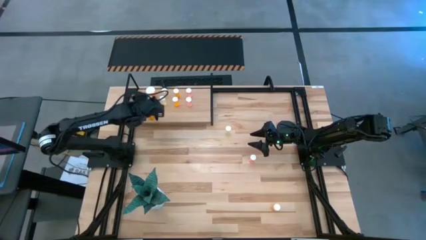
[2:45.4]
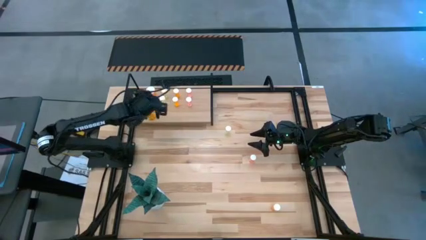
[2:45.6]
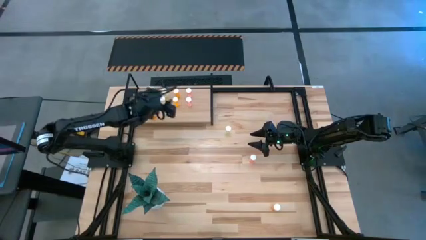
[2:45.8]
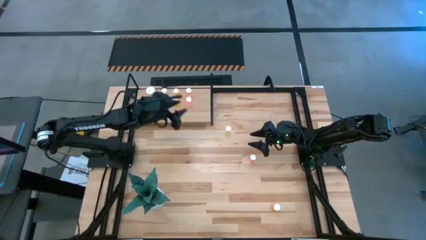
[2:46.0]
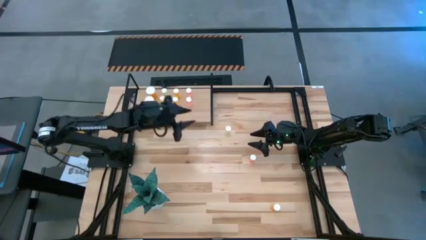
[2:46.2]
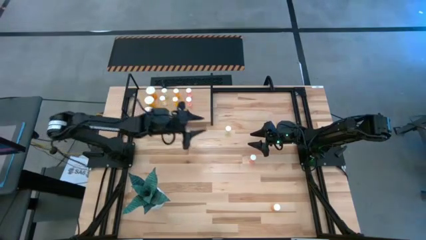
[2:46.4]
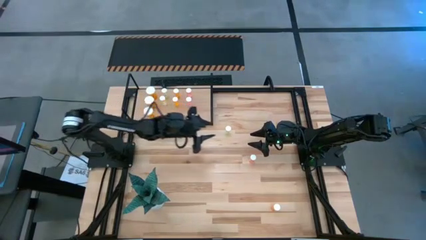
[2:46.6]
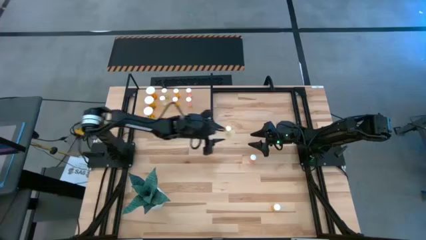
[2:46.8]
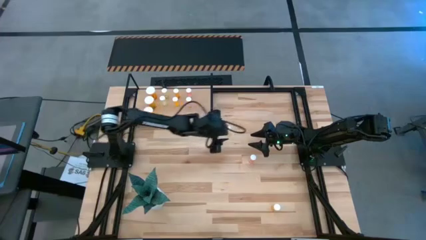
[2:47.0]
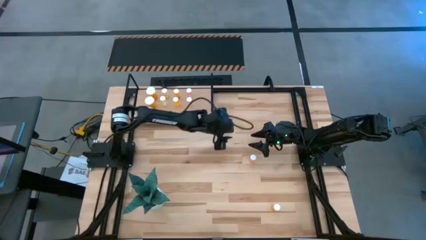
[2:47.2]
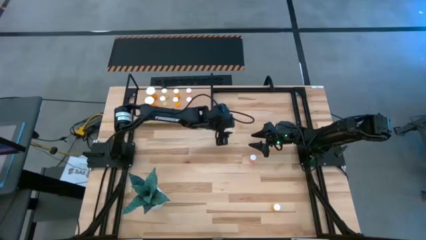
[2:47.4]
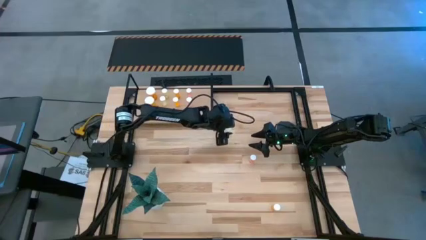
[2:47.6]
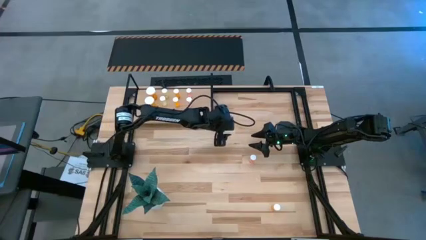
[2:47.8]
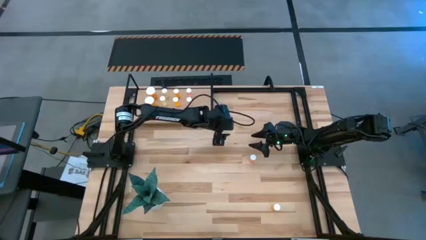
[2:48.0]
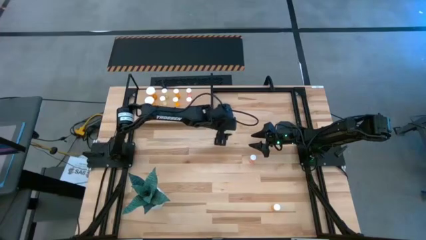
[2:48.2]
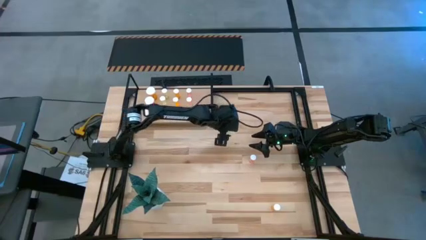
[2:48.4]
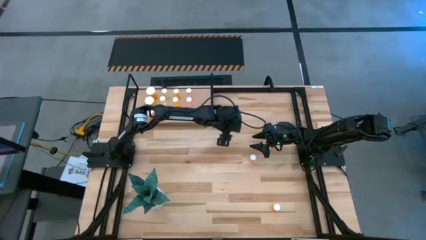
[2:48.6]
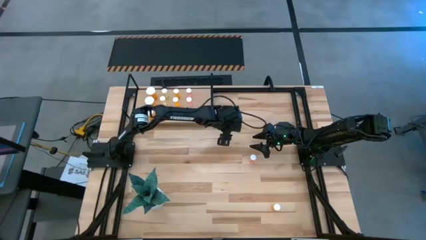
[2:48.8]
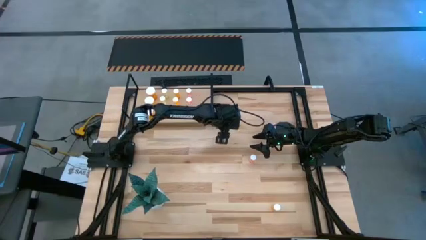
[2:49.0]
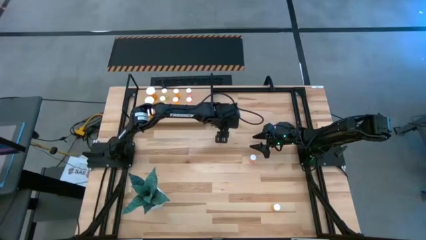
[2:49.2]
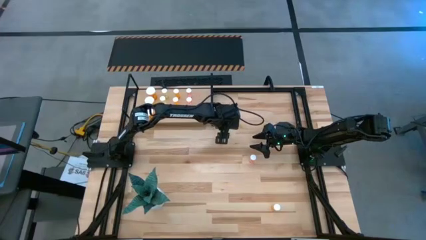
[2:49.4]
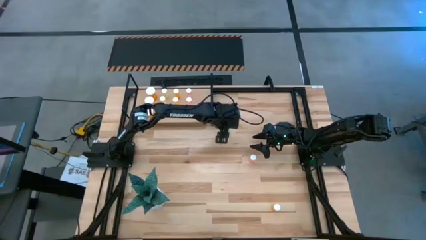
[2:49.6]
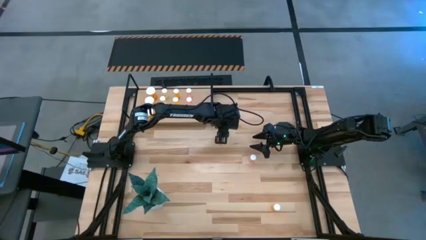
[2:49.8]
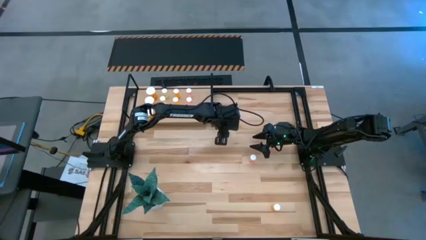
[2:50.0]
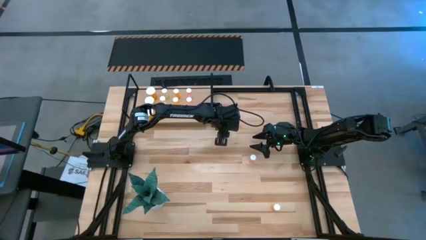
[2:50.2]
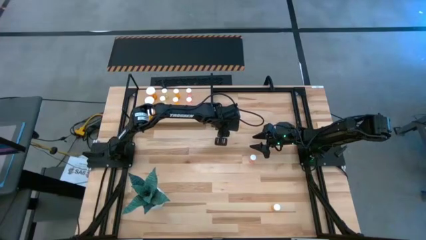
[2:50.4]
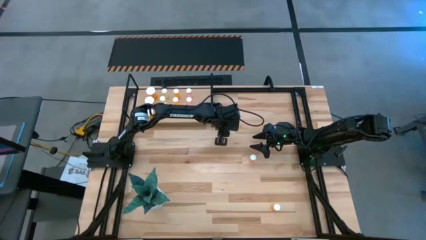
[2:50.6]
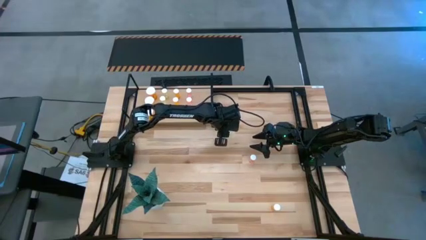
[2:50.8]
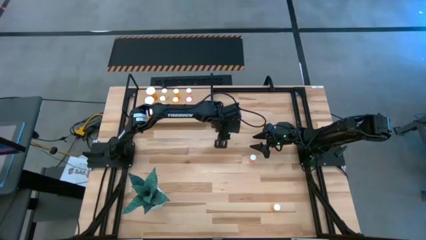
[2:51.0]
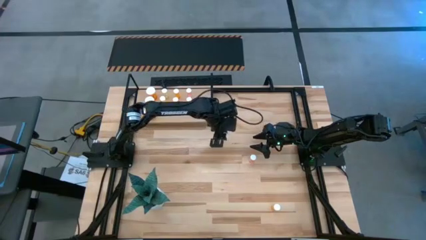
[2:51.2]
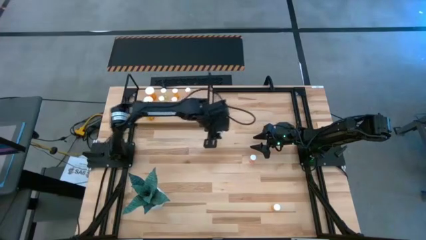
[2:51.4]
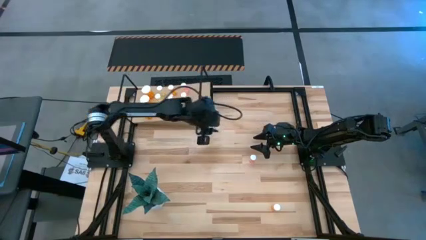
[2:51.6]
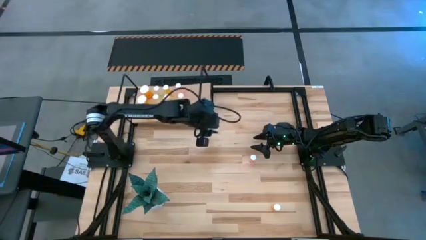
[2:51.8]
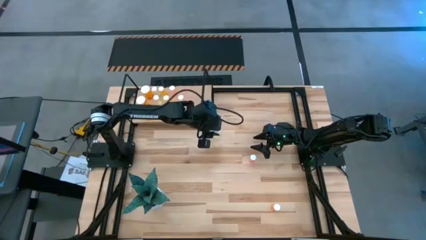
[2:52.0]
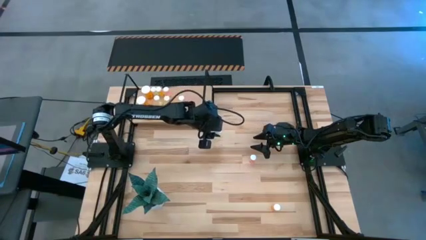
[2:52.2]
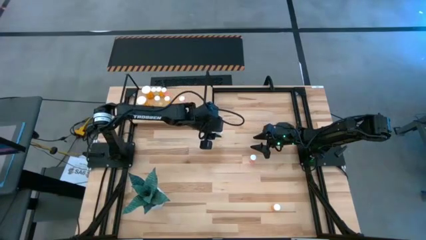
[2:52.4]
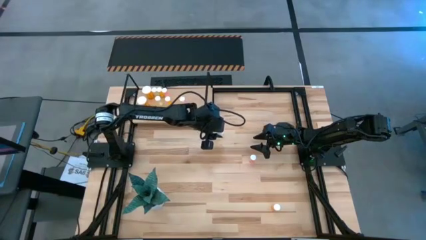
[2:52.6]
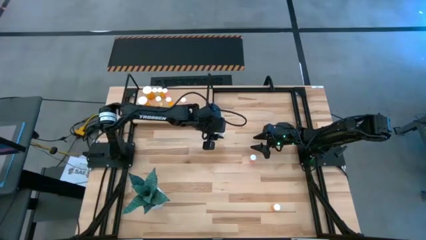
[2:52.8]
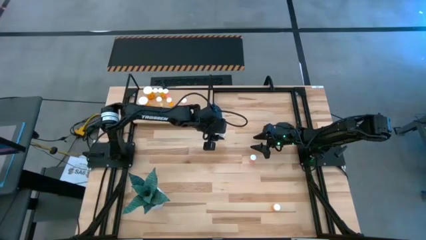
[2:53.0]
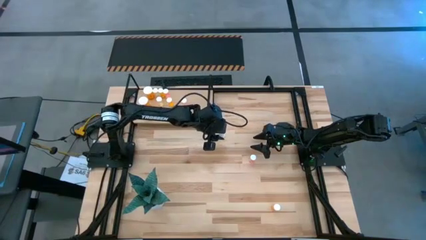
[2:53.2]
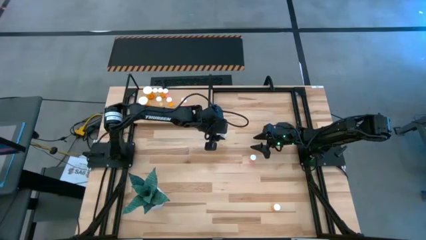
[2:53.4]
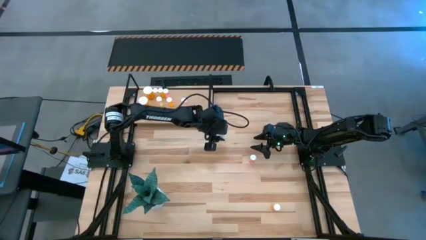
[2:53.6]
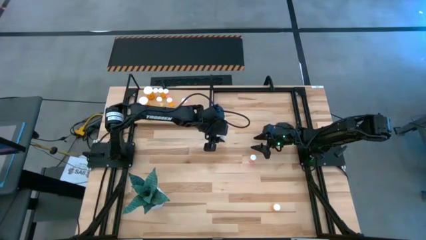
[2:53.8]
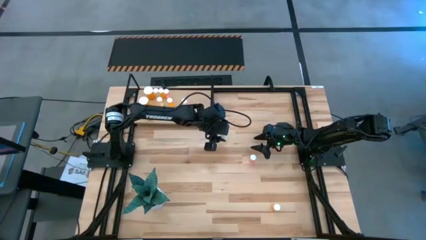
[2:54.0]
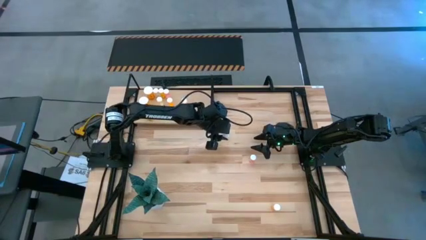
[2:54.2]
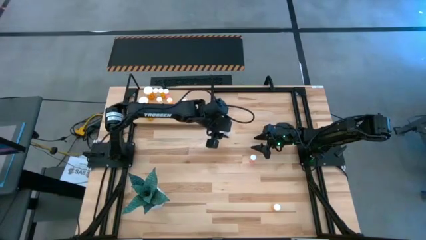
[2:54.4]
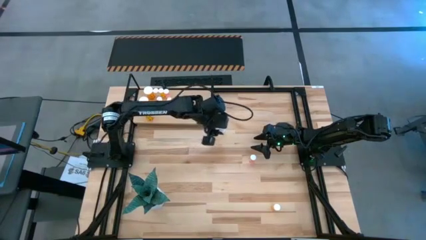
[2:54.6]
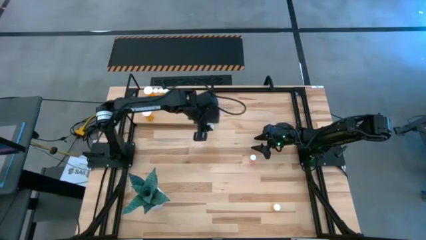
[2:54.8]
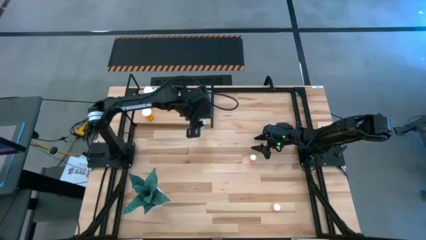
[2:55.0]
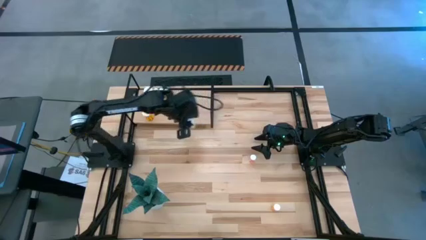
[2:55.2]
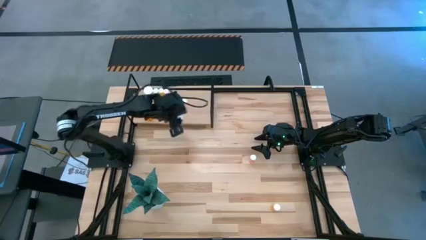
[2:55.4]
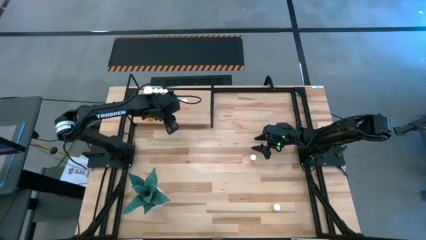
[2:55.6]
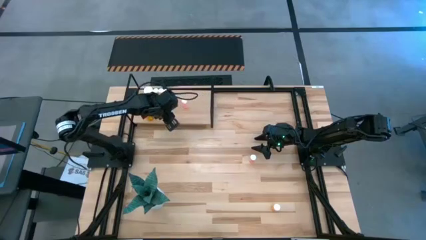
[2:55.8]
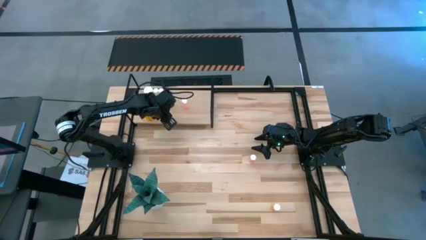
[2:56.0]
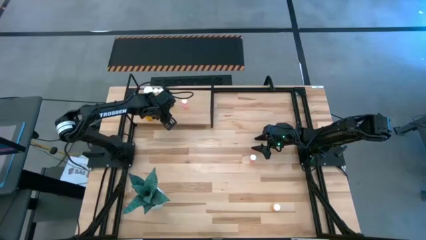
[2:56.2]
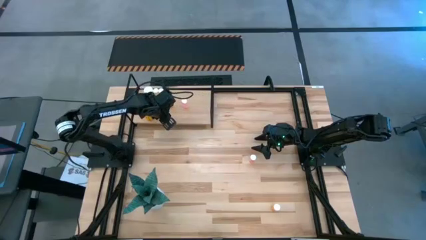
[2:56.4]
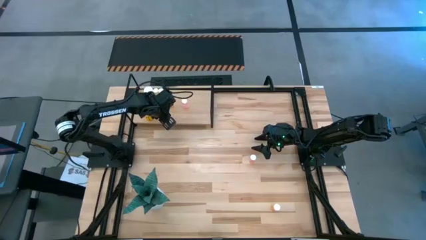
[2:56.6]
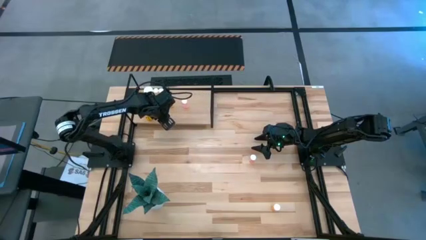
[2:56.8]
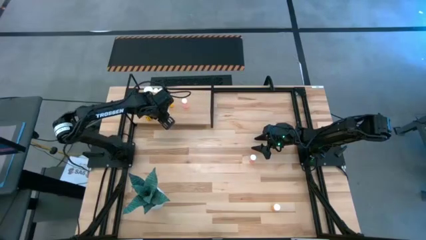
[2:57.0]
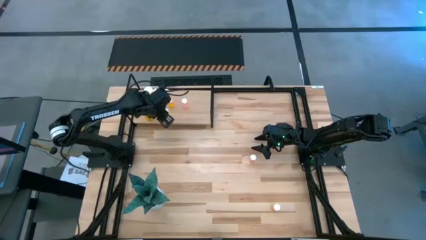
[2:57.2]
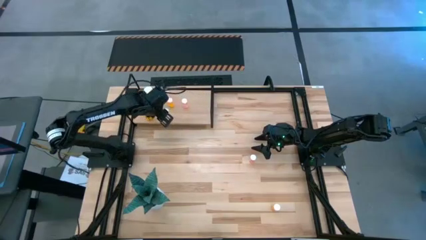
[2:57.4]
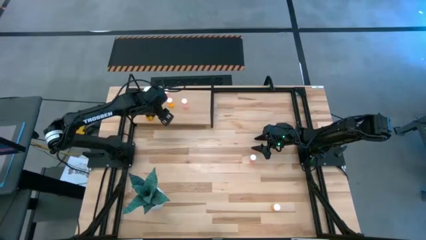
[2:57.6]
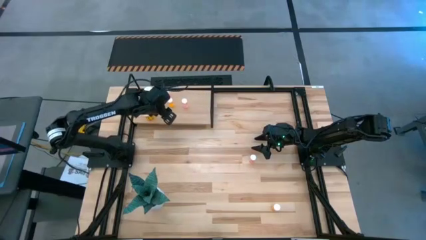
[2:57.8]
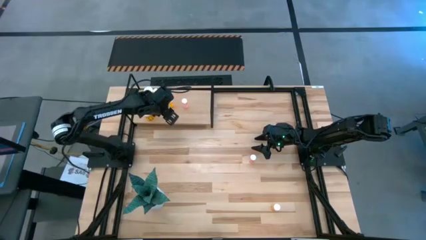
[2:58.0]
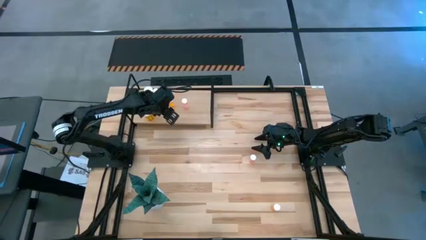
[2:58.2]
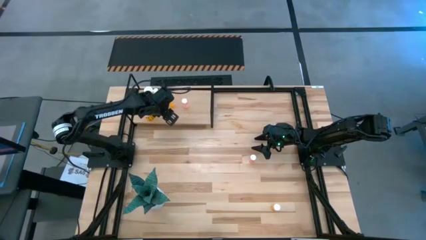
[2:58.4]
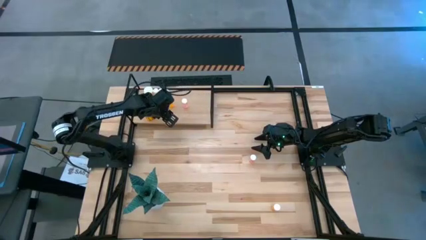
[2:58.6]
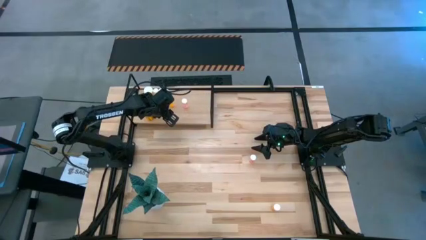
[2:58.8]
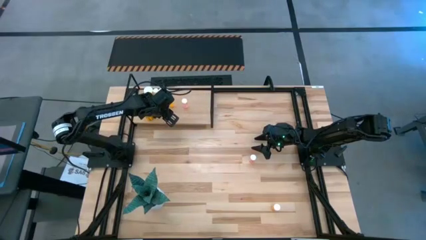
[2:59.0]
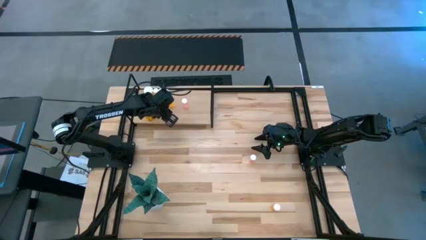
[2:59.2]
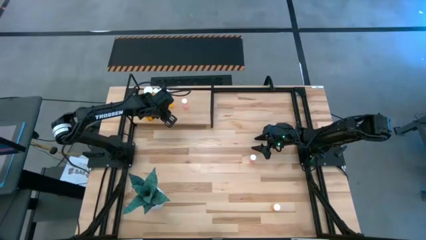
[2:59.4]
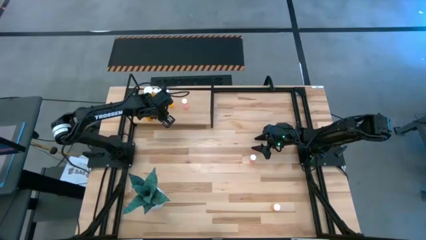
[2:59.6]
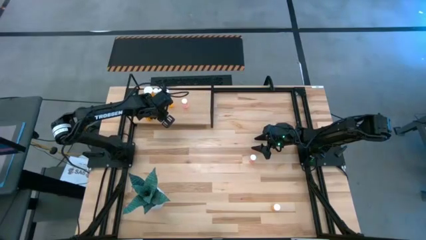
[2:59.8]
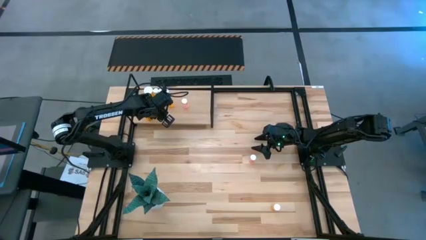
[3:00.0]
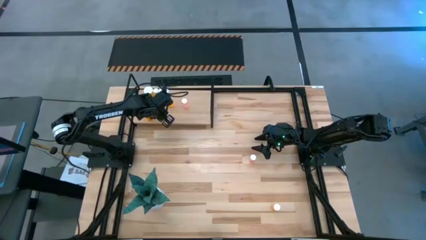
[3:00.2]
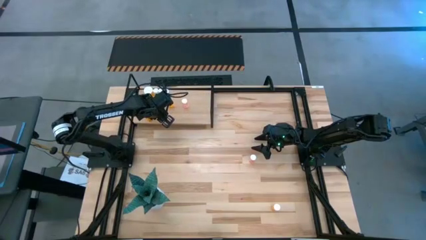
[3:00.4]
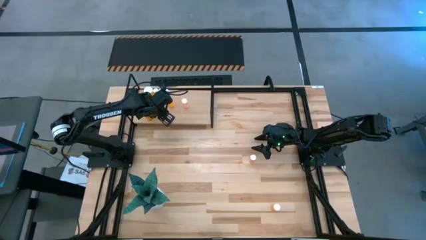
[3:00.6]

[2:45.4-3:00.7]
Task: Pick and place medicine bottles onto shelf by color
Put the yellow pill bottle aligned with the other yellow pill bottle on the shelf
